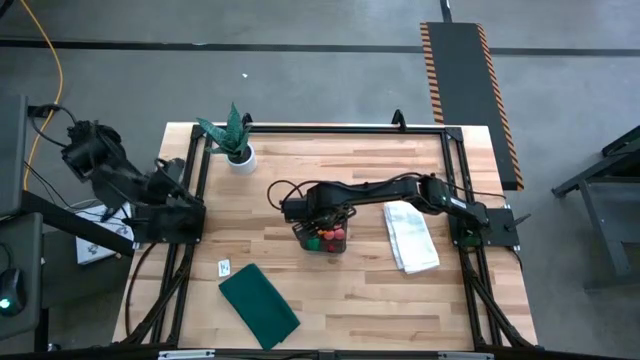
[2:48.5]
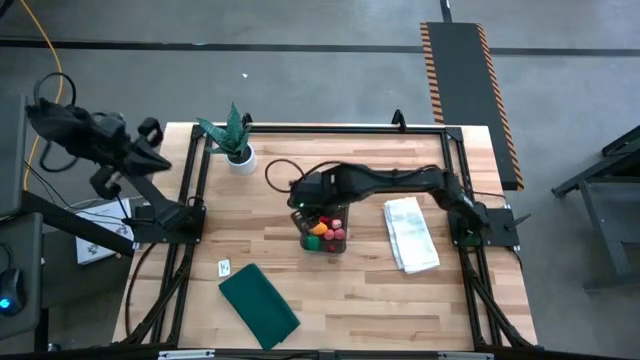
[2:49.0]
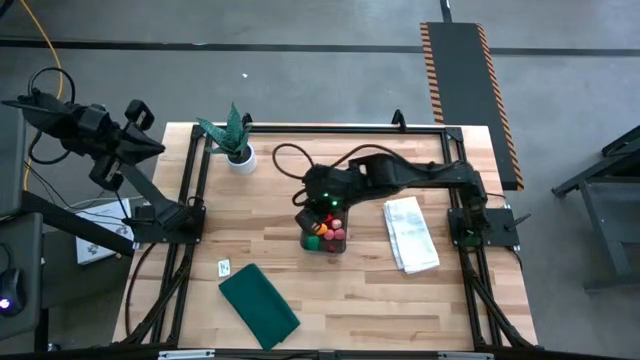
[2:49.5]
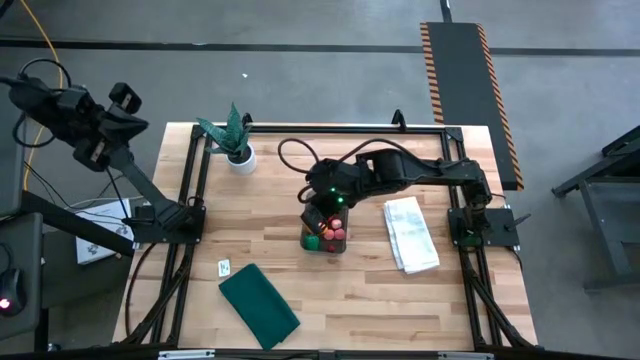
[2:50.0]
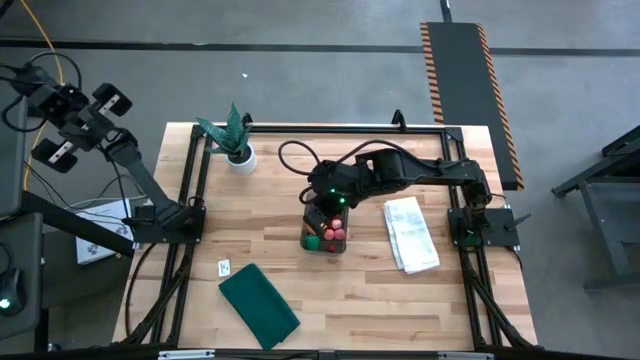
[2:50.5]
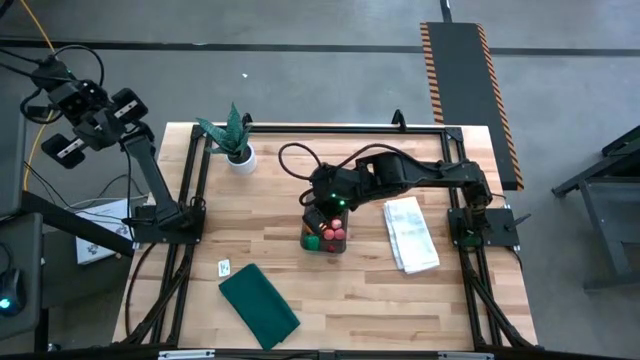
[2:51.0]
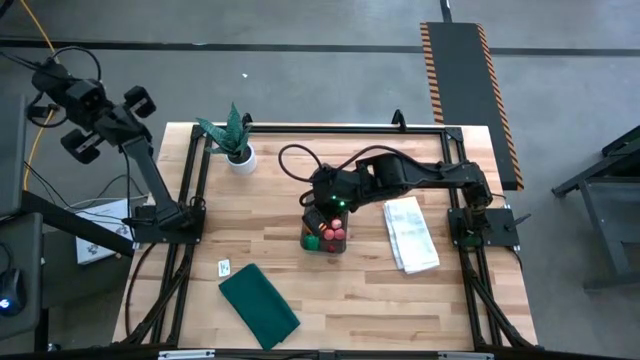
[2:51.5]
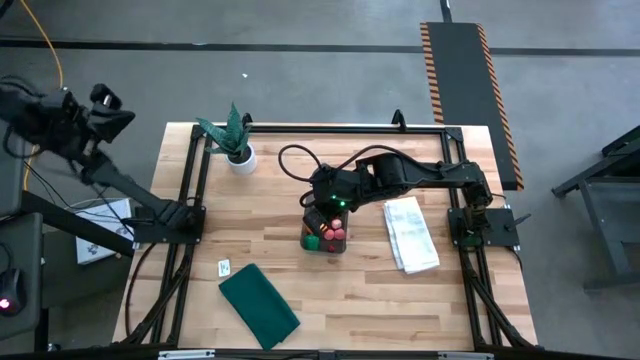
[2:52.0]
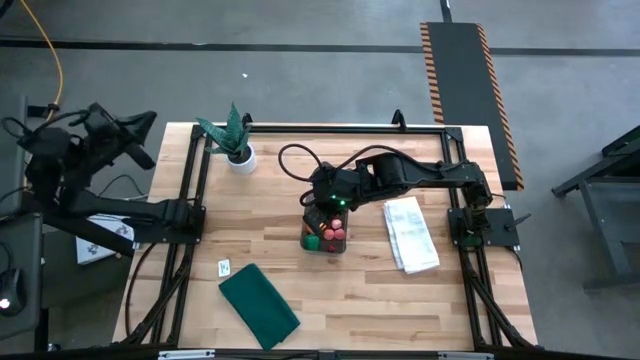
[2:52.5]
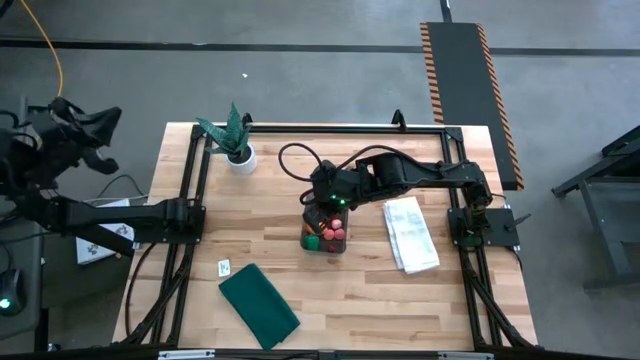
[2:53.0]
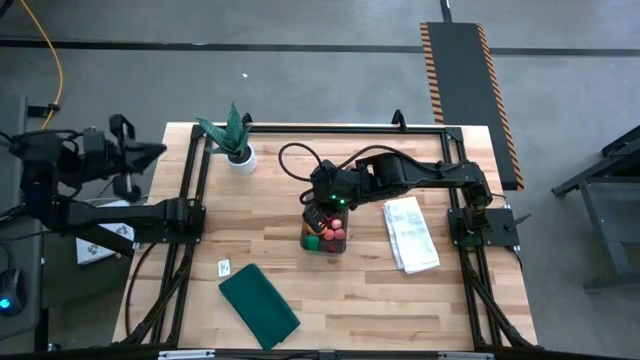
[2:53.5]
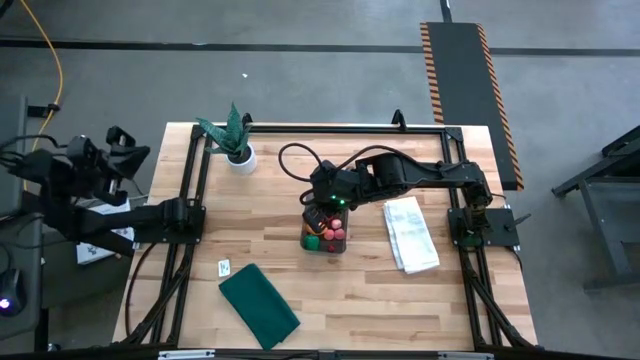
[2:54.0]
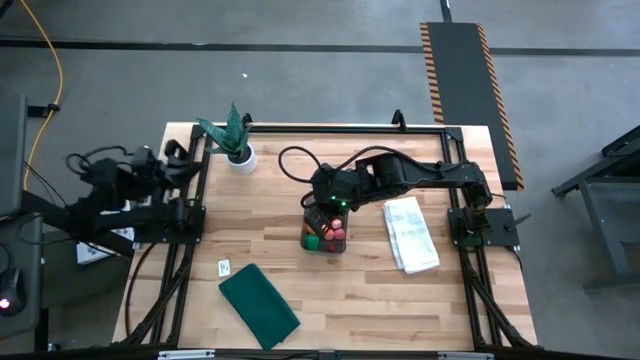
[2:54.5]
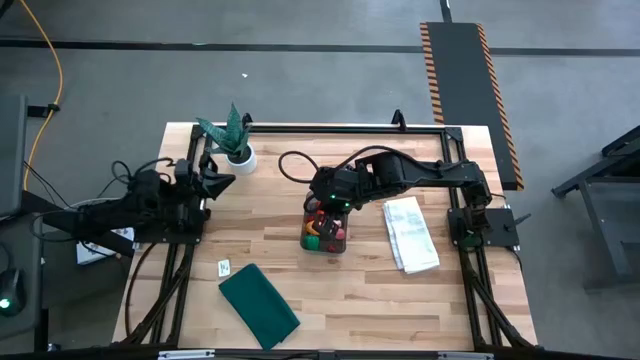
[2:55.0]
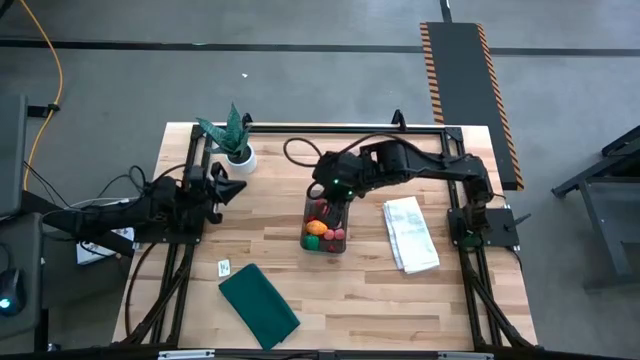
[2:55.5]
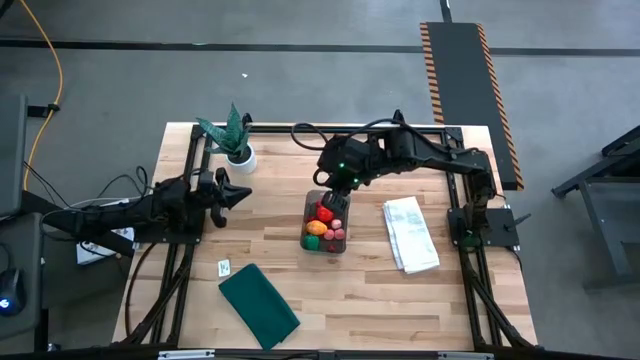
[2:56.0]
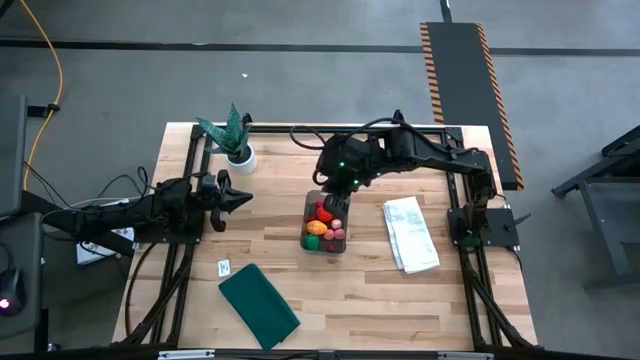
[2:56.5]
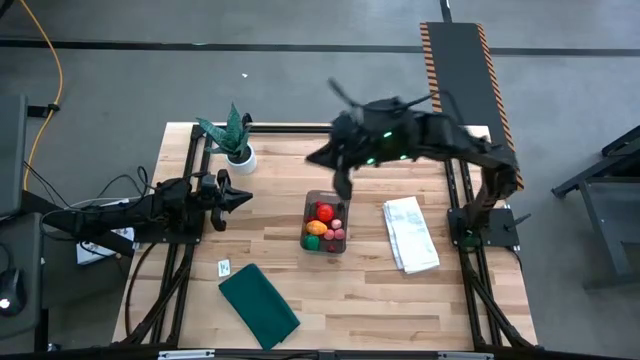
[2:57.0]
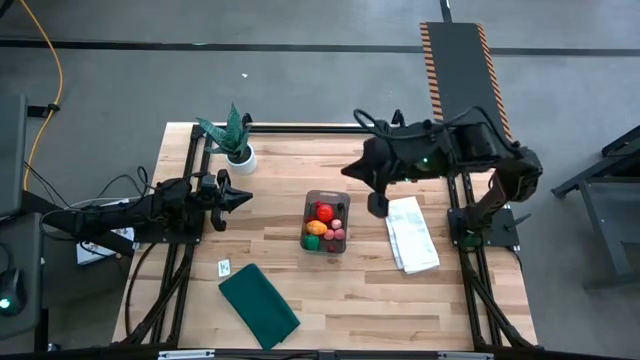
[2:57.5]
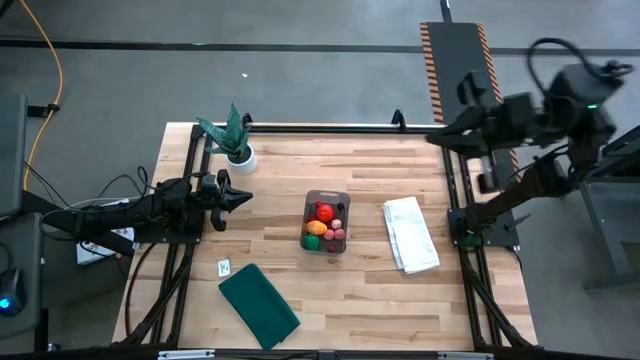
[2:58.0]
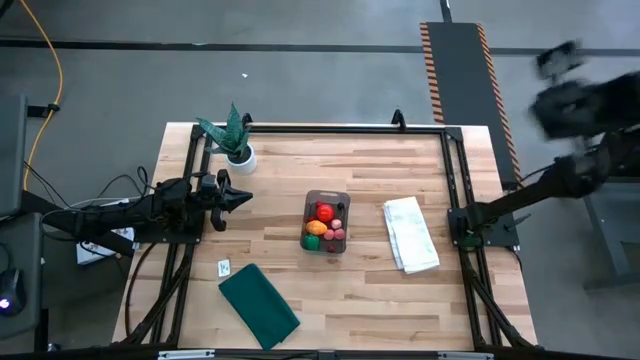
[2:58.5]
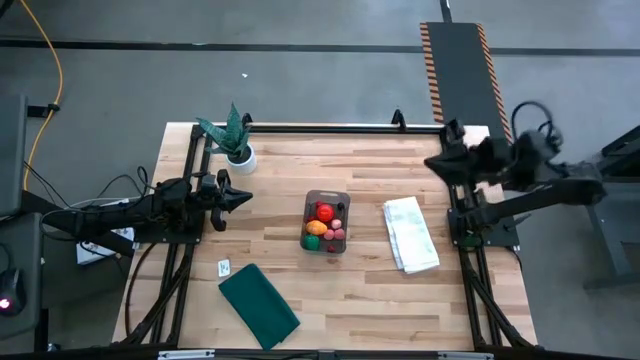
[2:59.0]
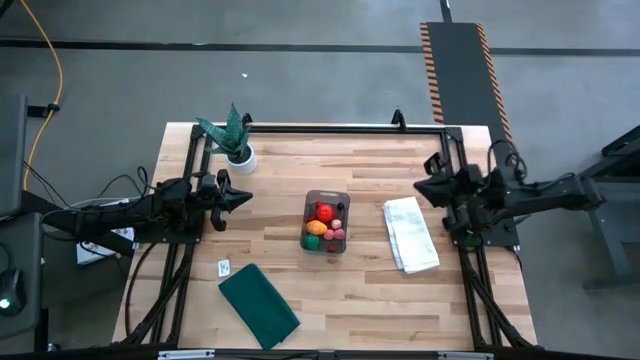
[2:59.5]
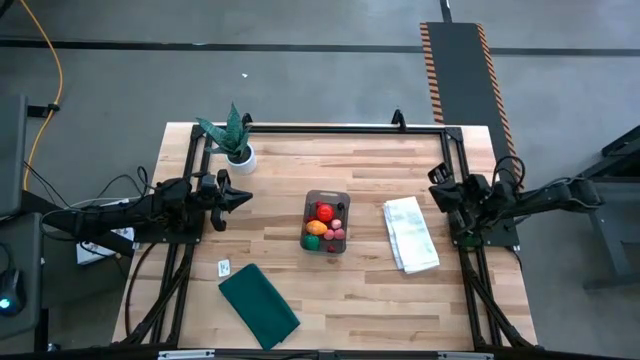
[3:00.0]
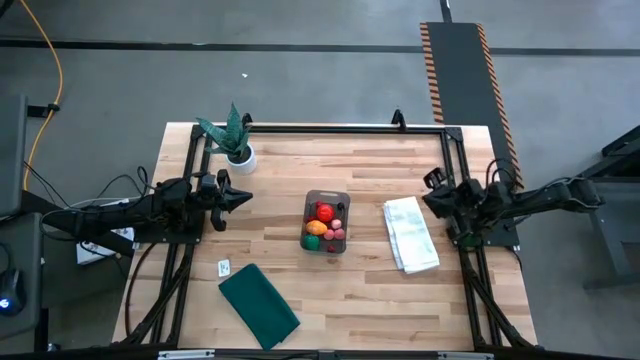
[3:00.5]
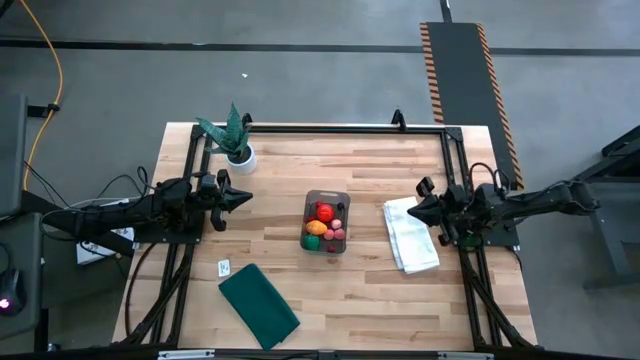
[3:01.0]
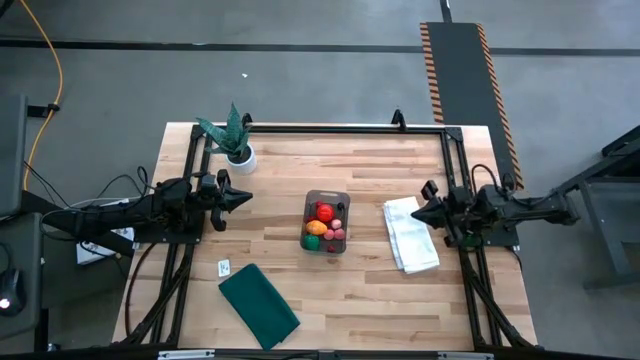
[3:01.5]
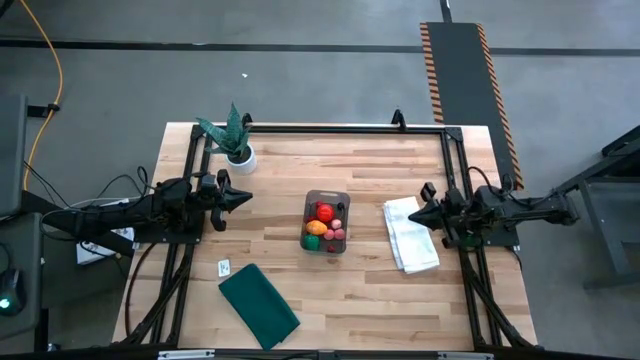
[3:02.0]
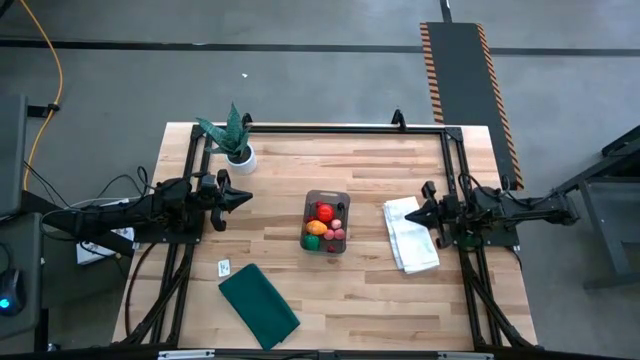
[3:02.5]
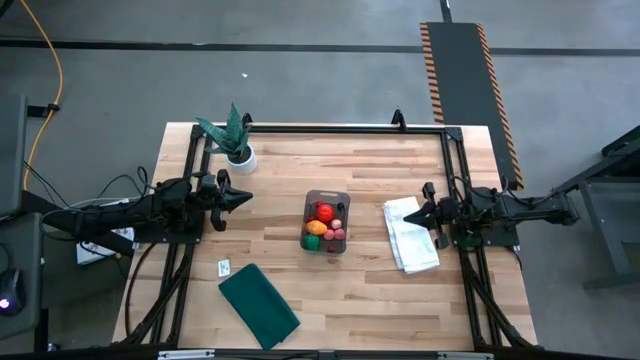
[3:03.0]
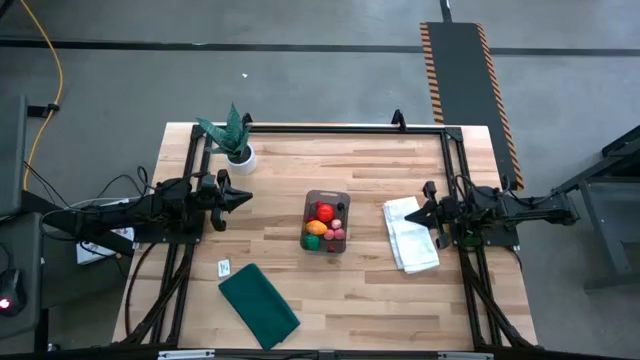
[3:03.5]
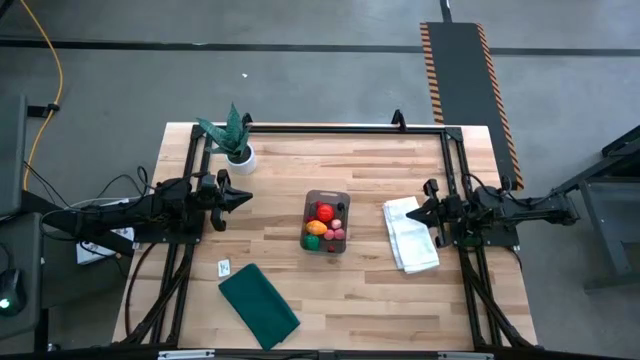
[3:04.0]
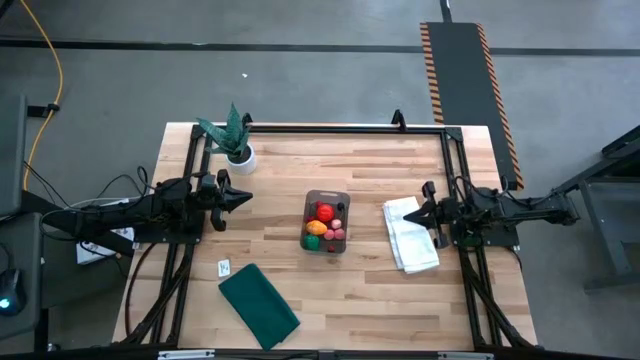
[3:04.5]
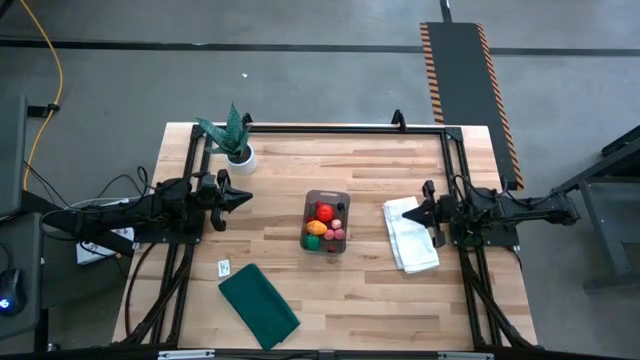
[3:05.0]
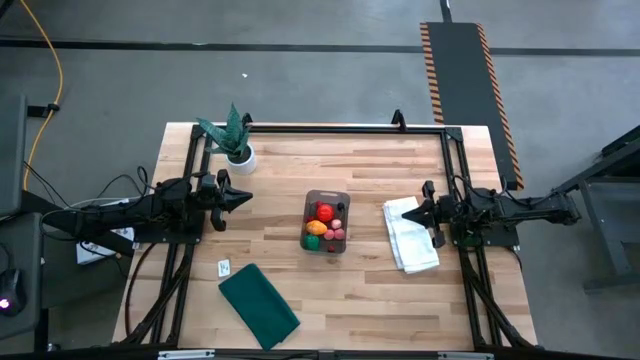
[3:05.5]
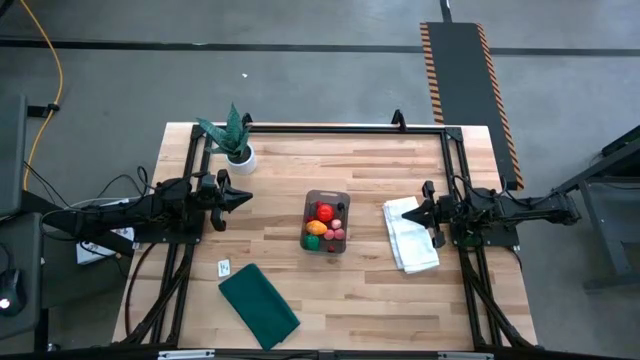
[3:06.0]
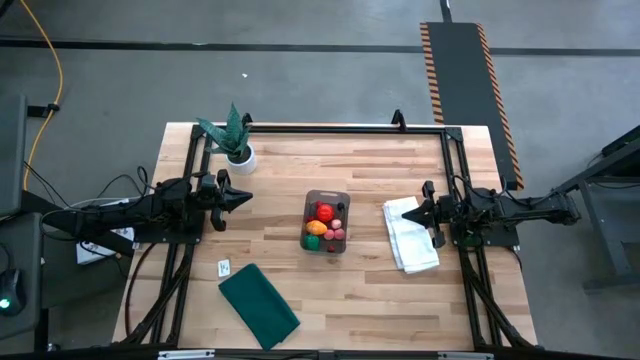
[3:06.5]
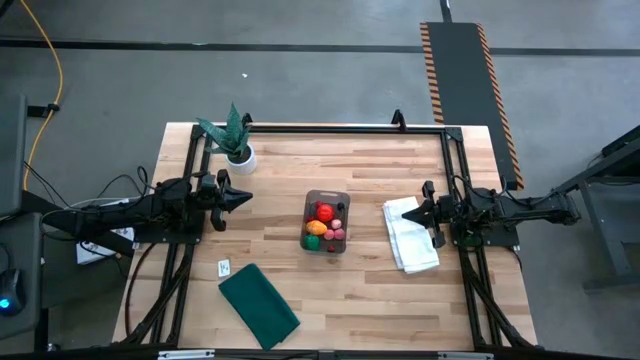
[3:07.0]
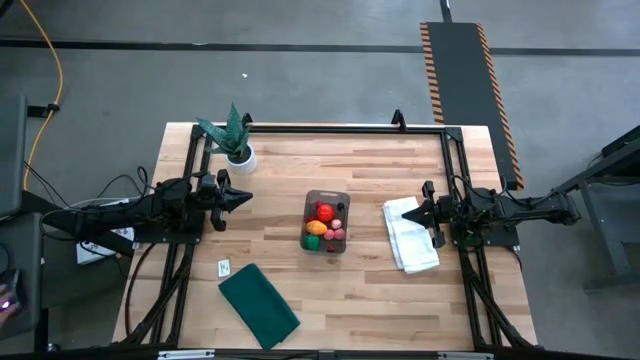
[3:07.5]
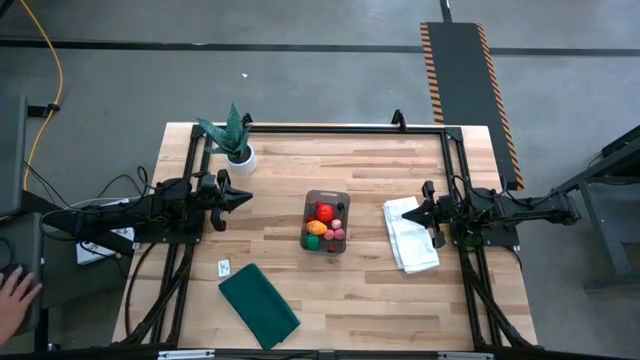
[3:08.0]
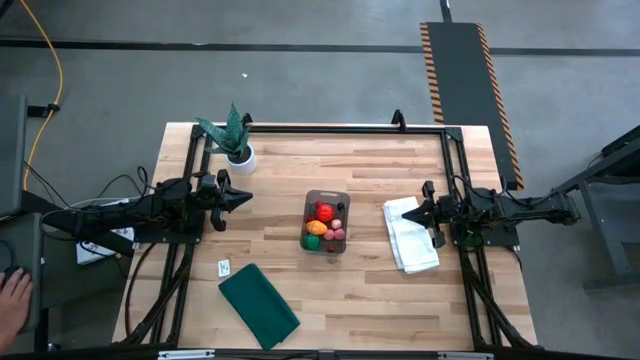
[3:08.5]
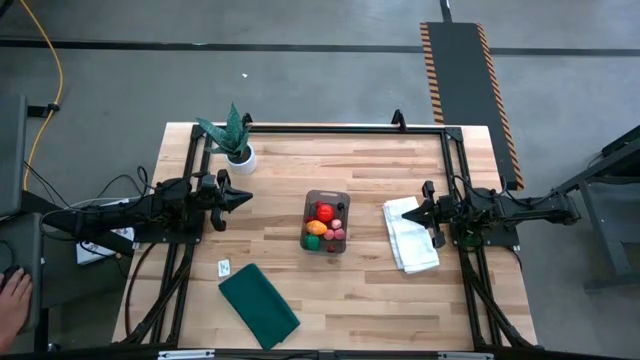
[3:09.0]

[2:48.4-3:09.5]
Task: Pick and placing Produce into tupperware
Return to Home Position
